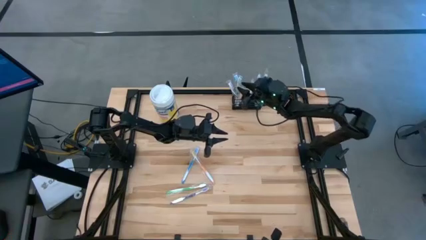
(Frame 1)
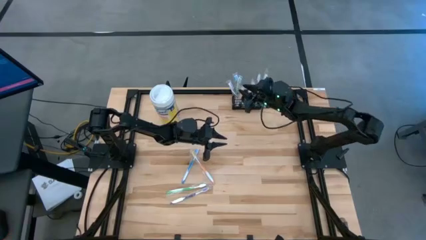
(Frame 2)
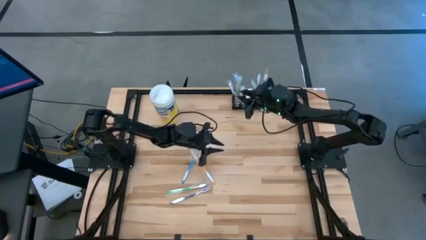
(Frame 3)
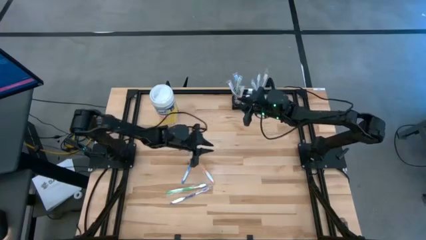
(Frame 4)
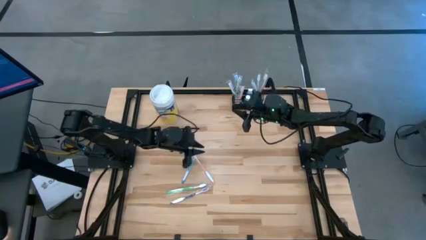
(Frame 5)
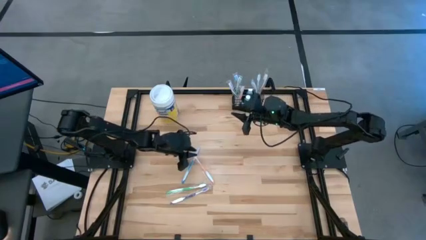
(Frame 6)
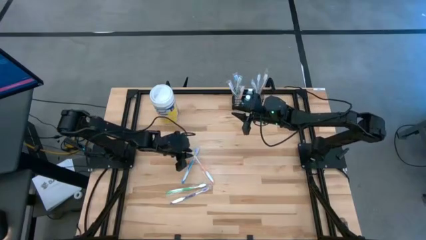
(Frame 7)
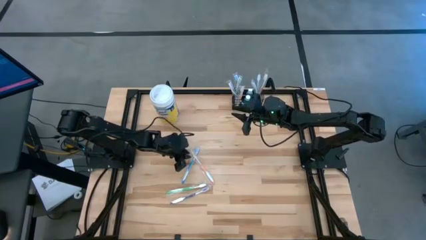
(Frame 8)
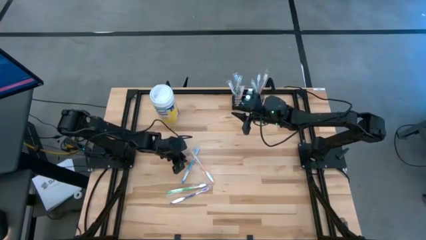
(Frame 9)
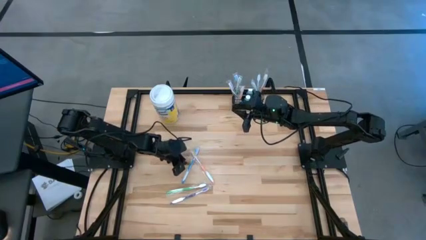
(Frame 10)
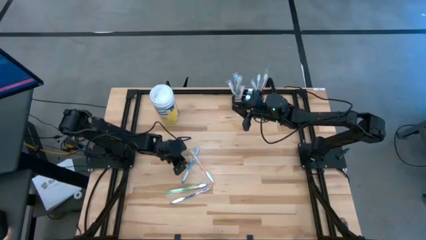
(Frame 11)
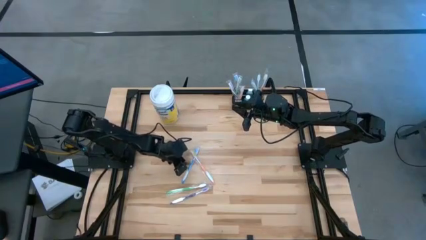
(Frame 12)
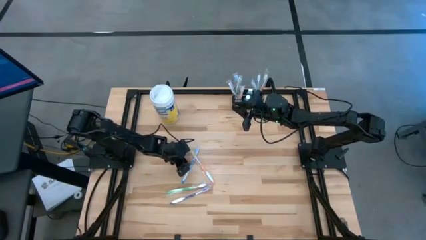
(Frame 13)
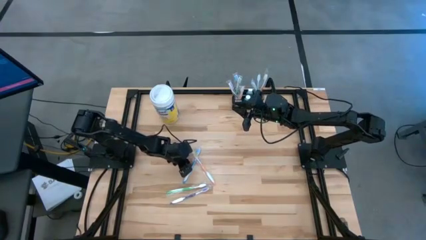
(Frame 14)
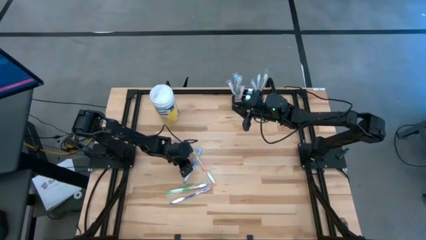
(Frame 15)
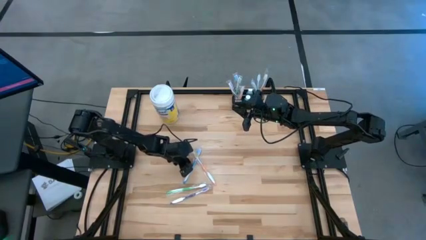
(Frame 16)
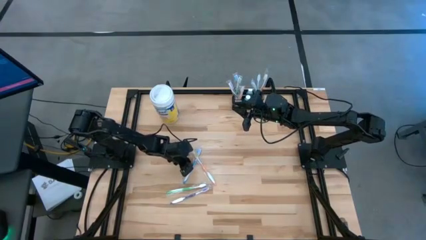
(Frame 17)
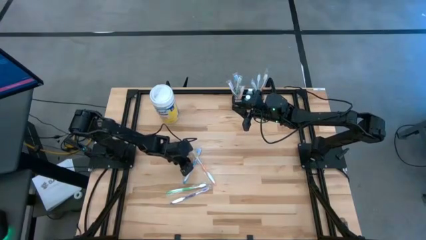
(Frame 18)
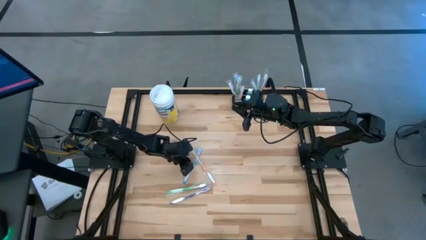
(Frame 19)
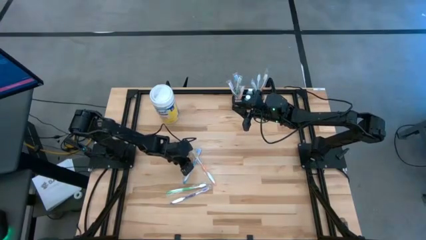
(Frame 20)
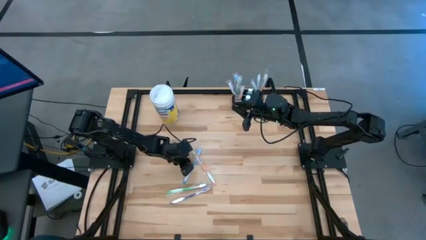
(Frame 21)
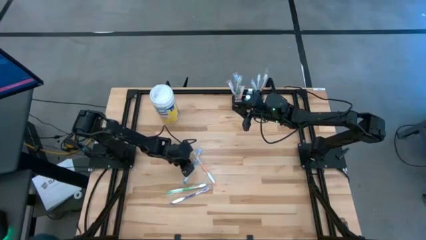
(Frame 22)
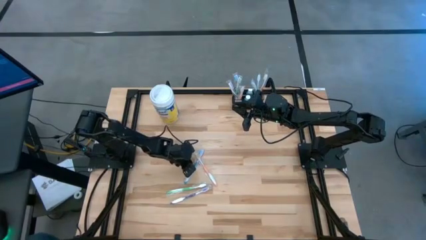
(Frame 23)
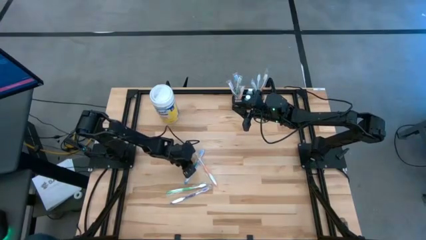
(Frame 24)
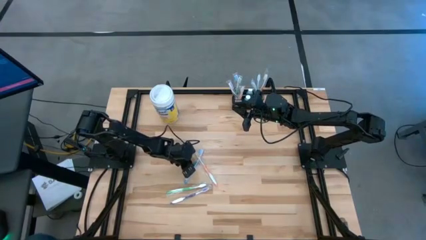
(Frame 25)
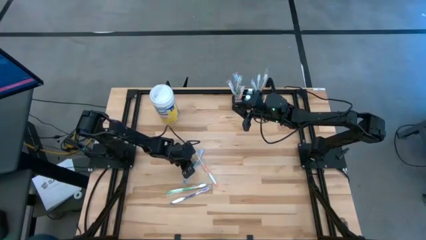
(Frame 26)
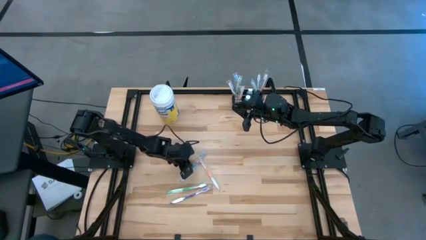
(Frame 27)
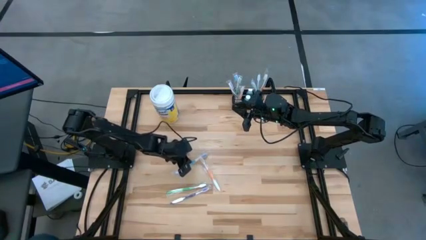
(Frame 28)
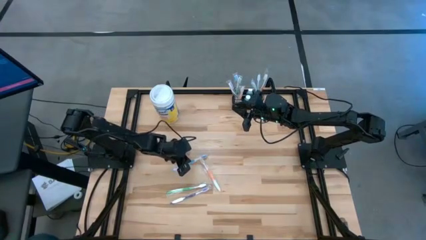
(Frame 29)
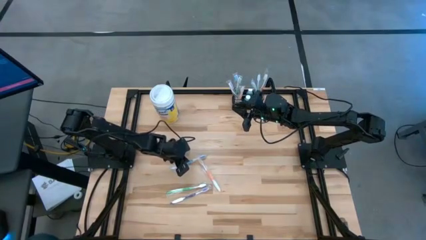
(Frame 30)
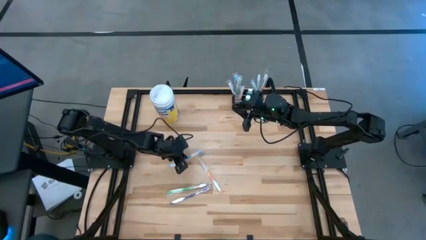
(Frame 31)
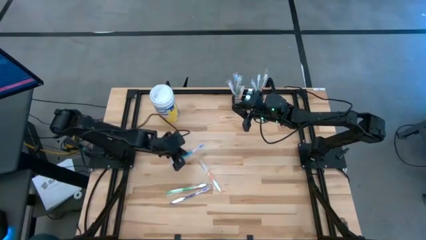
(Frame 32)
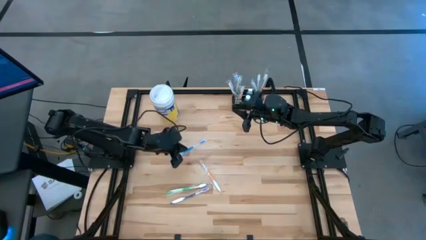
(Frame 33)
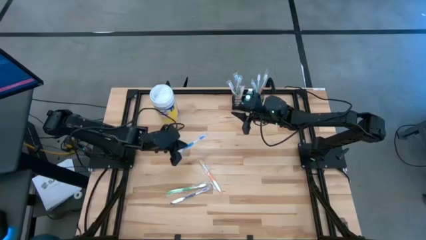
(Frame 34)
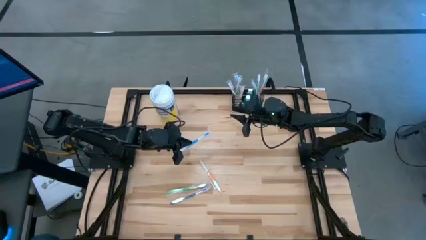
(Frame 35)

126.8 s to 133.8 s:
Task: Pick & Place toothbrushing station
Put the blue toothbrush into the black mesh organizer

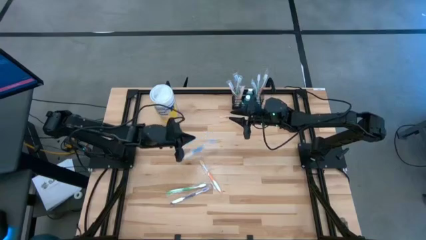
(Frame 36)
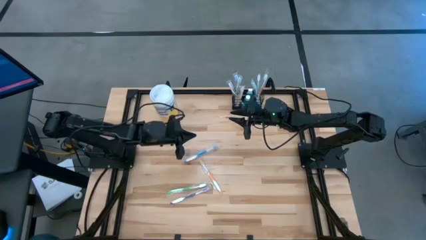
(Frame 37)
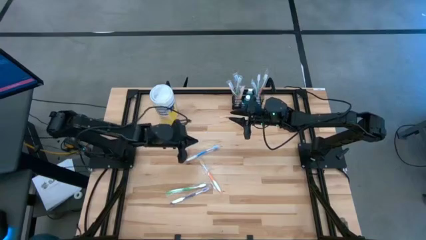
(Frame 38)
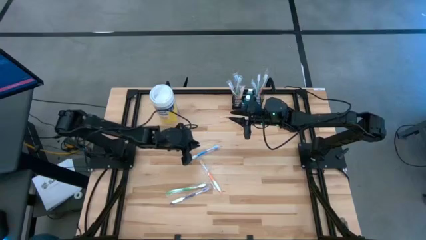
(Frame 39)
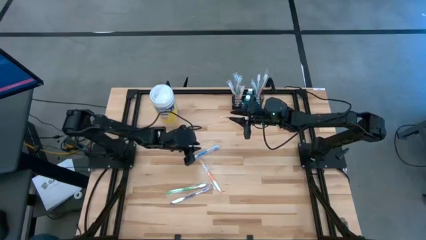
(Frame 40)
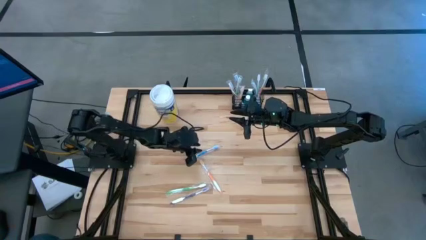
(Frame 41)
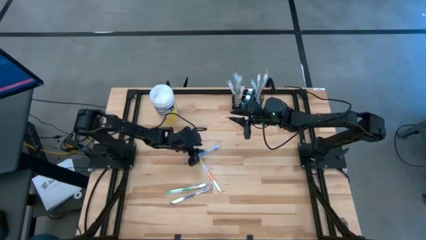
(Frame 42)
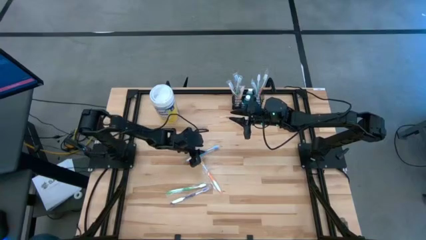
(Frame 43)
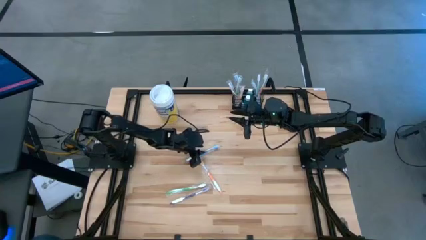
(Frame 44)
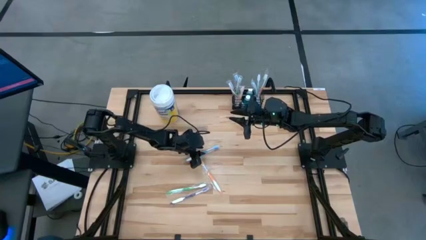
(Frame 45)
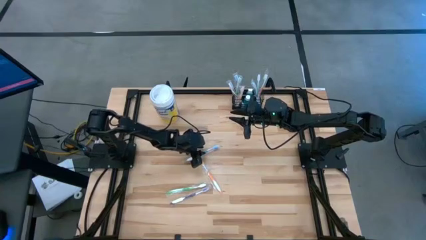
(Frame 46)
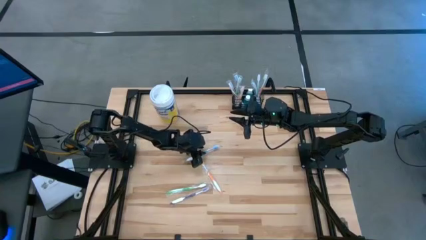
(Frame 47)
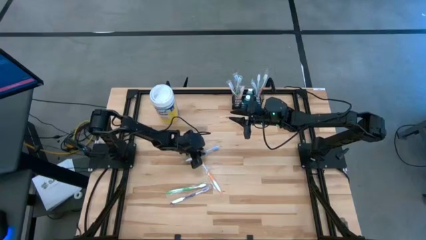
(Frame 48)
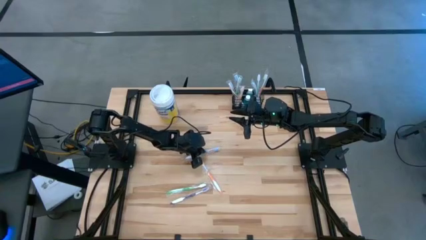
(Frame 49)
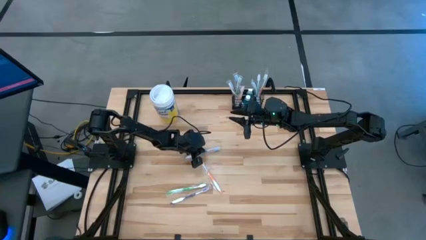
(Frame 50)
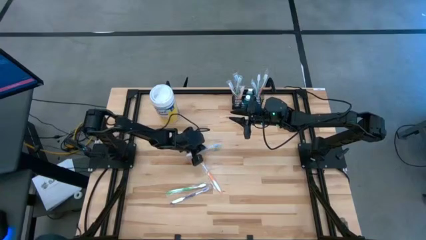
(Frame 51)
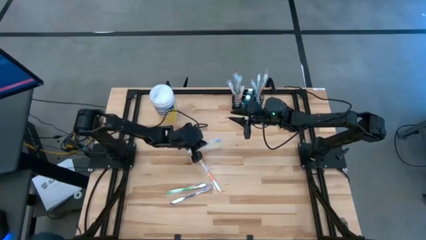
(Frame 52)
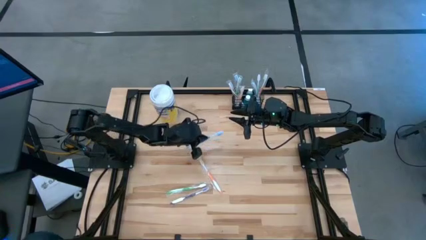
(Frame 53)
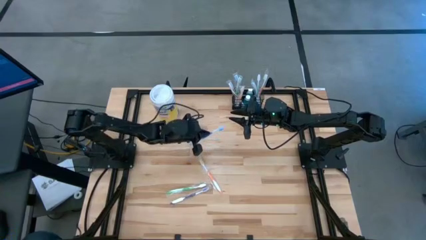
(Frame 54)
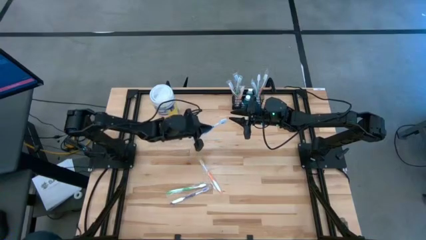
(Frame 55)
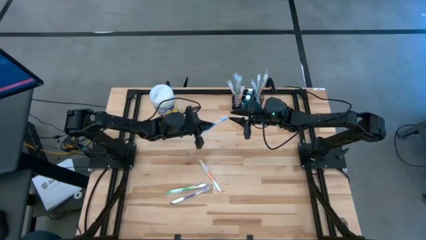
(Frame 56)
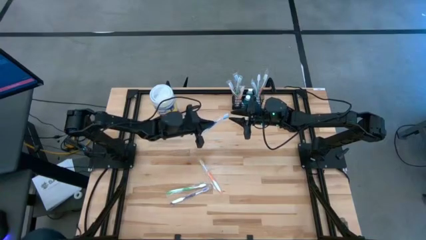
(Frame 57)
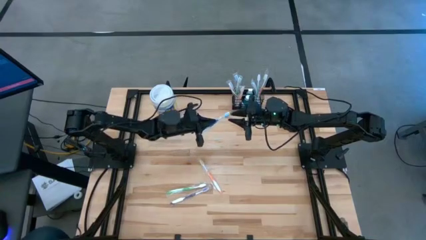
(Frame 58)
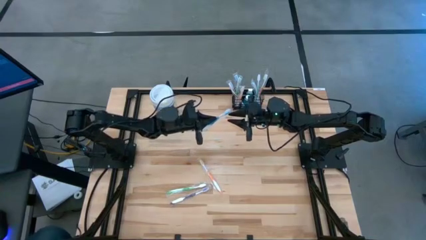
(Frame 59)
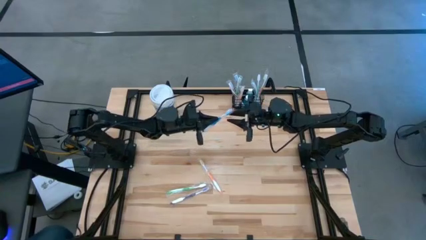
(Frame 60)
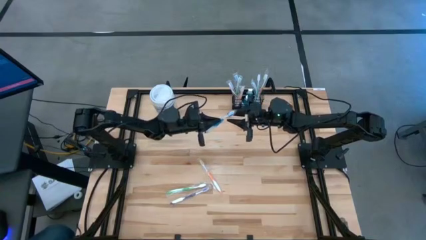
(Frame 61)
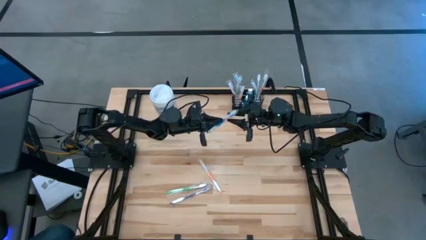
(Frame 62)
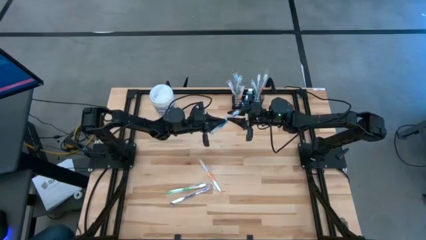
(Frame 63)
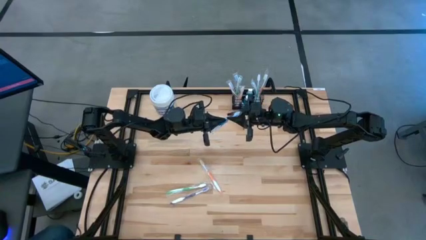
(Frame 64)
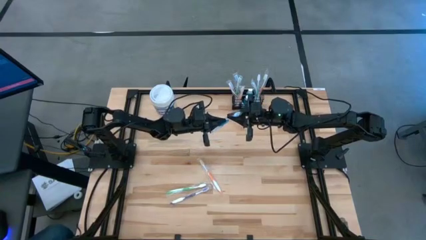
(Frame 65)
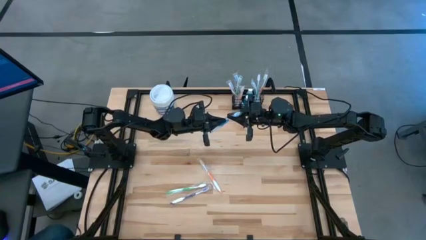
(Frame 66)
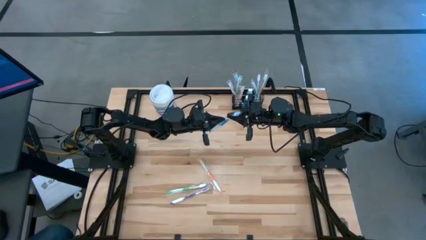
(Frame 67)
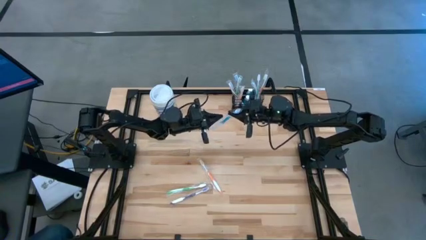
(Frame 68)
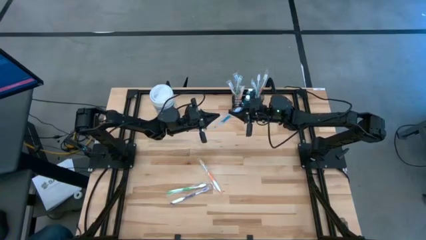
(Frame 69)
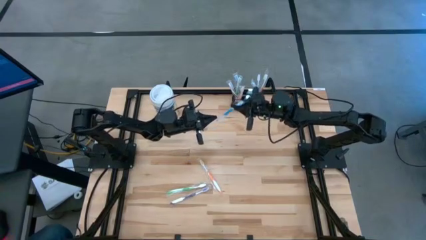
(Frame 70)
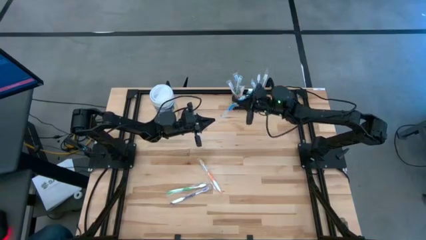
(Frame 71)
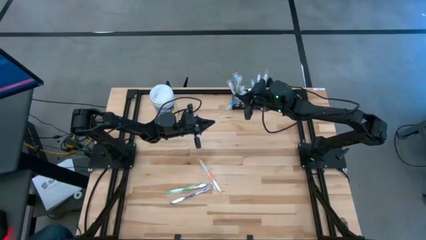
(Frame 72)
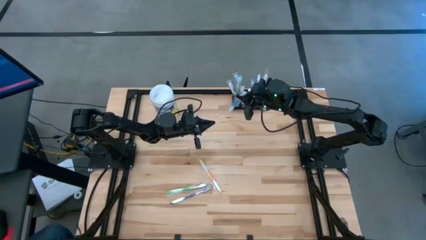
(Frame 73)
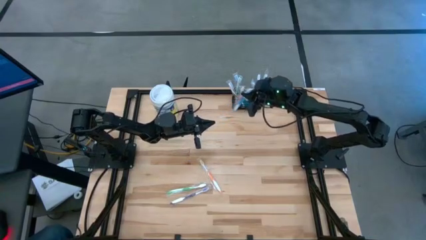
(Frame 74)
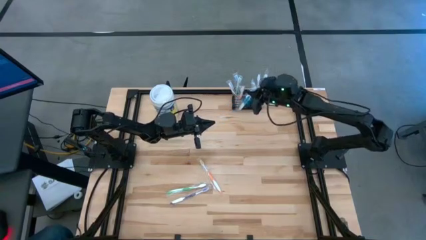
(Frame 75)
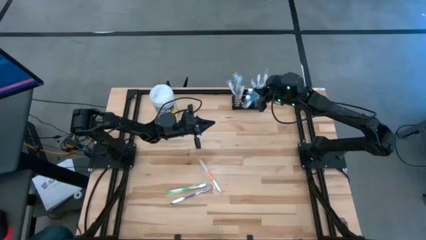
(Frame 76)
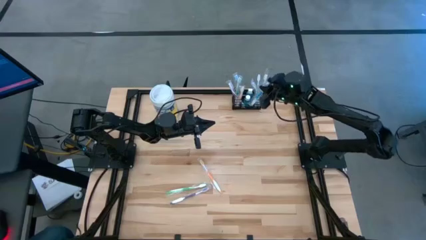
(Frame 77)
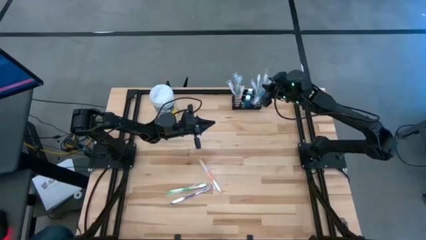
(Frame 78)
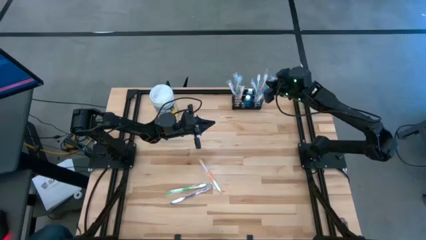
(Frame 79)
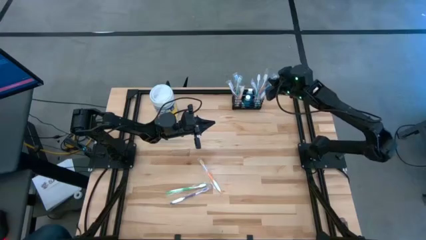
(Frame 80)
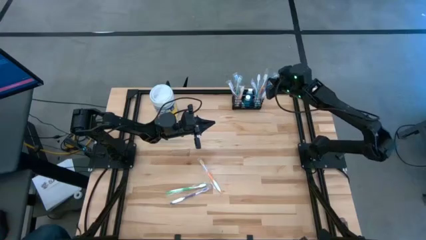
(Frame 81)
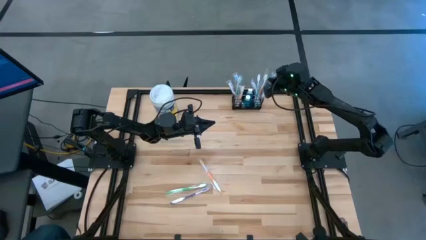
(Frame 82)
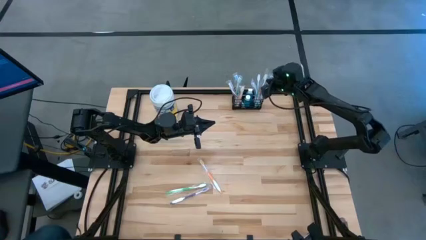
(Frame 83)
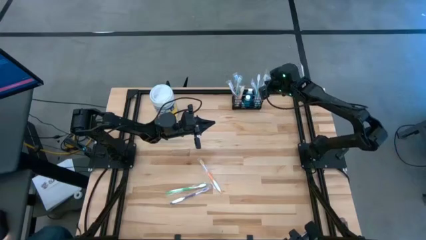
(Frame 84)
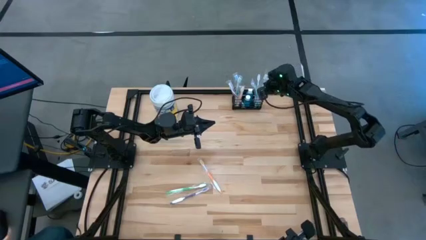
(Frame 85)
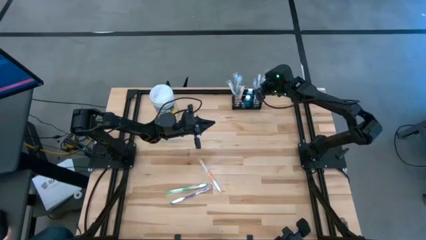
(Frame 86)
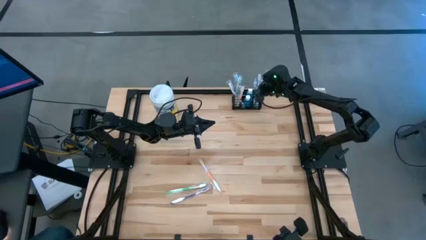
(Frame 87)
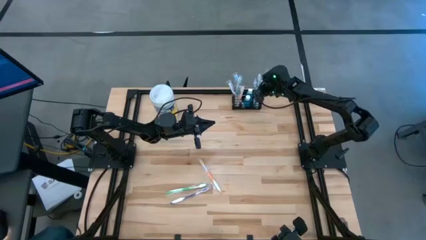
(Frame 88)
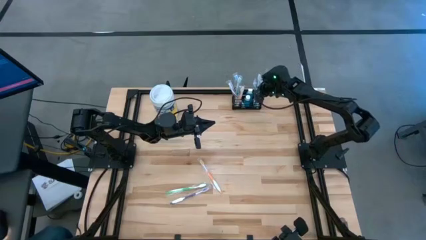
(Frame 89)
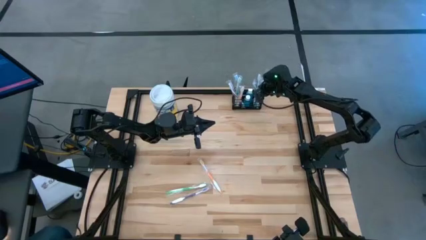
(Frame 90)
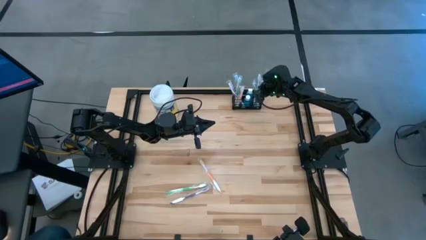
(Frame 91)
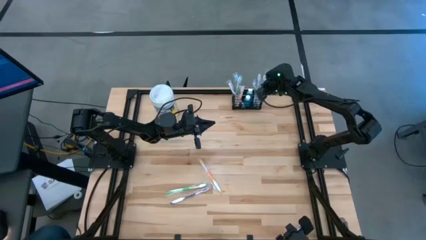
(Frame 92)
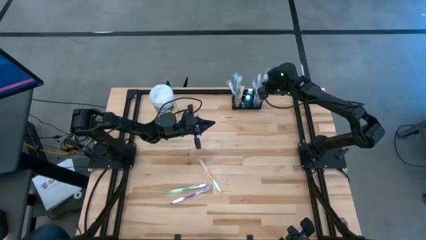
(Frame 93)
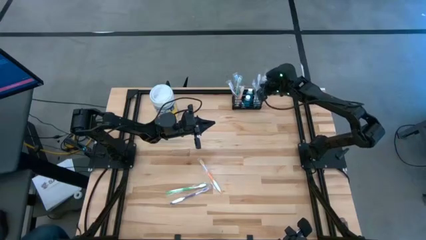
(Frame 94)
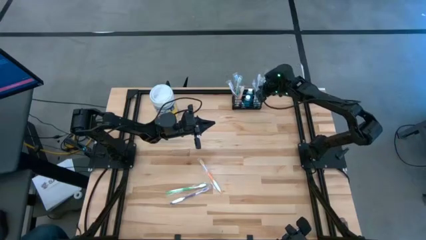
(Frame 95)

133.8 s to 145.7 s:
Put the blue toothbrush into the black mesh organizer
